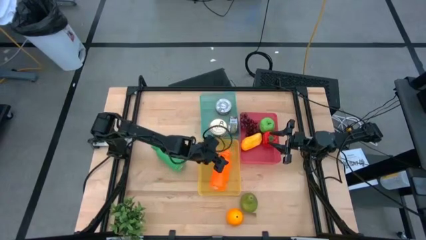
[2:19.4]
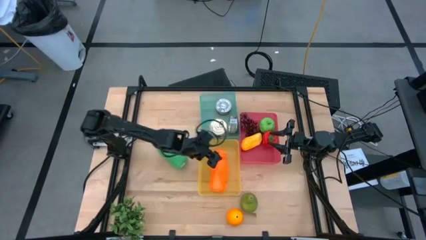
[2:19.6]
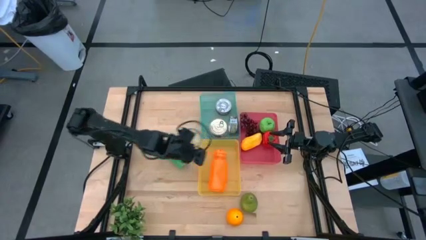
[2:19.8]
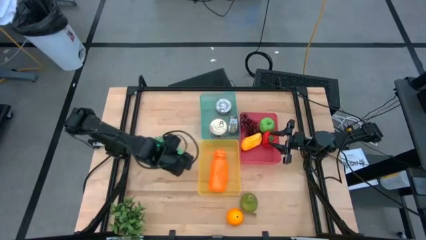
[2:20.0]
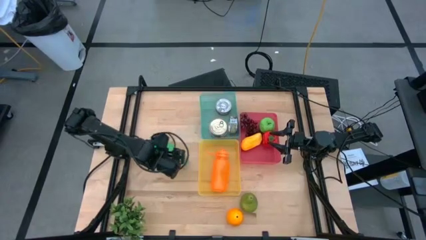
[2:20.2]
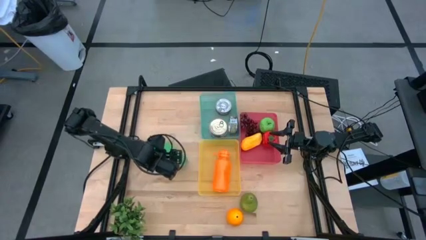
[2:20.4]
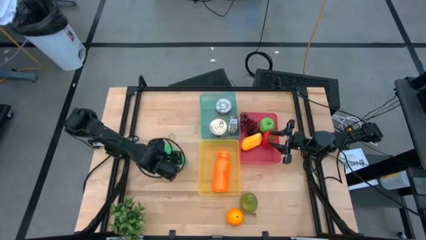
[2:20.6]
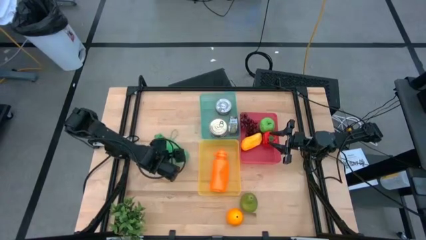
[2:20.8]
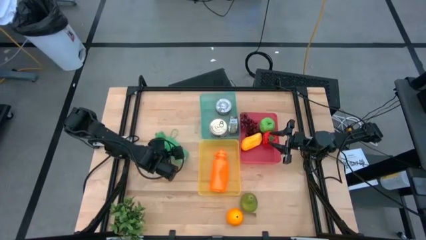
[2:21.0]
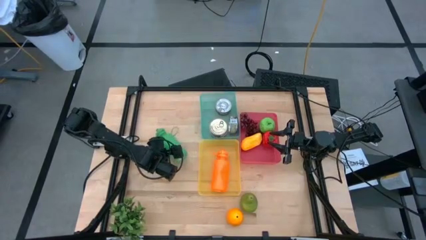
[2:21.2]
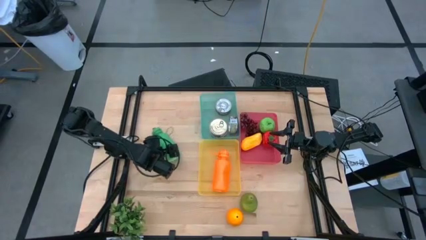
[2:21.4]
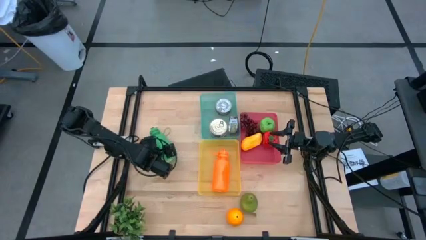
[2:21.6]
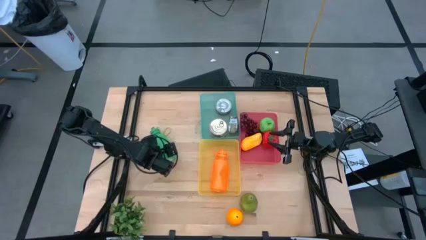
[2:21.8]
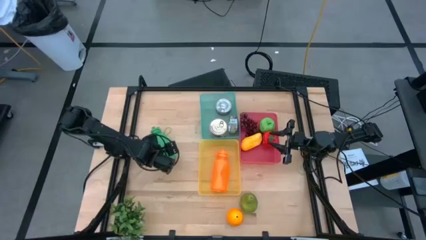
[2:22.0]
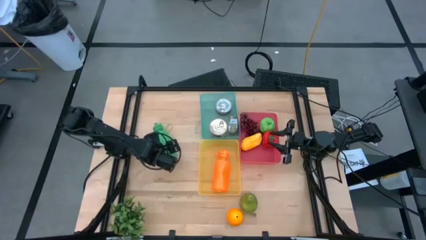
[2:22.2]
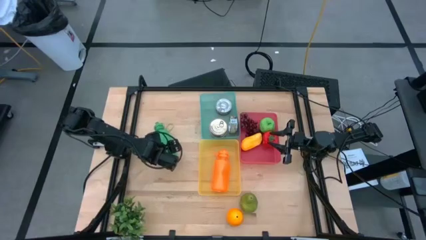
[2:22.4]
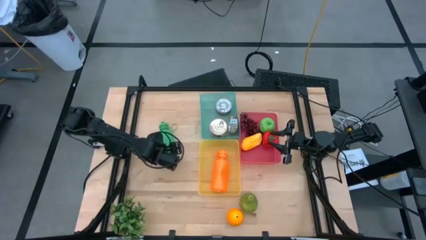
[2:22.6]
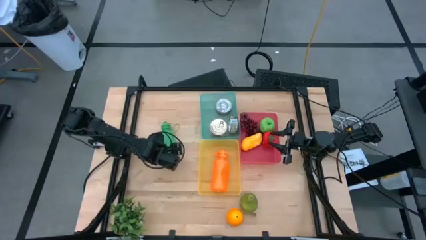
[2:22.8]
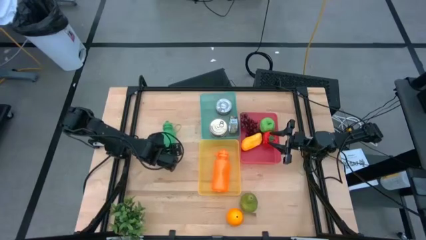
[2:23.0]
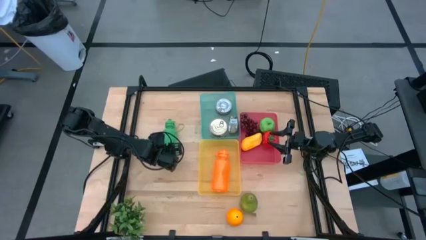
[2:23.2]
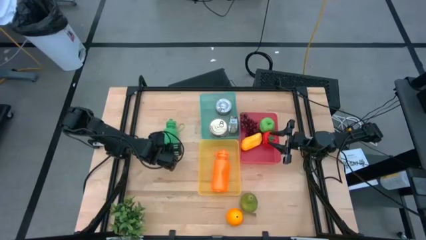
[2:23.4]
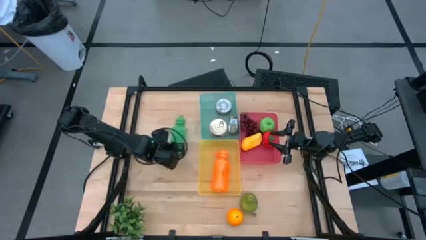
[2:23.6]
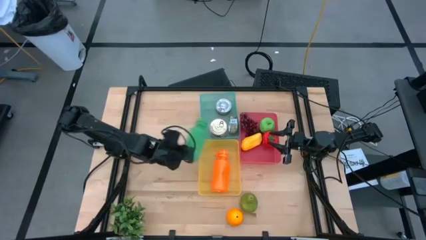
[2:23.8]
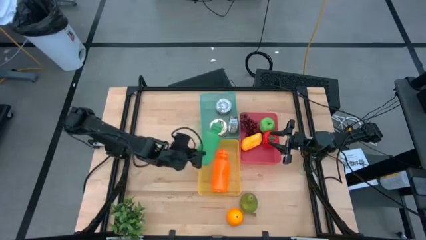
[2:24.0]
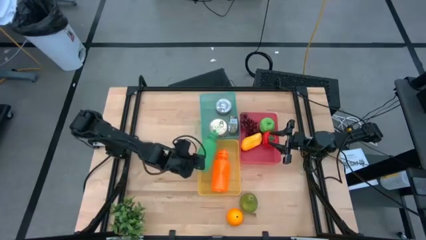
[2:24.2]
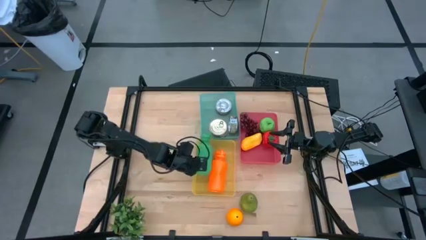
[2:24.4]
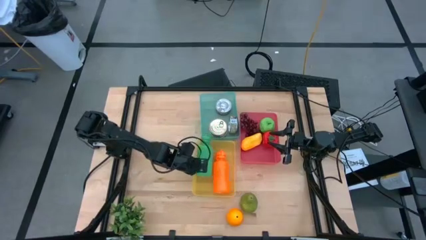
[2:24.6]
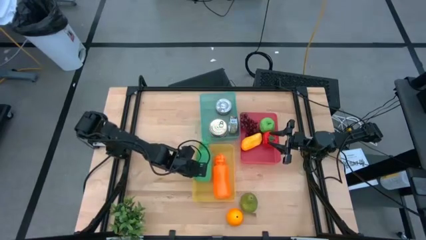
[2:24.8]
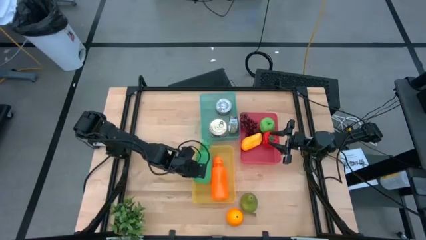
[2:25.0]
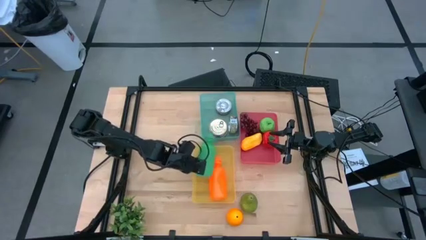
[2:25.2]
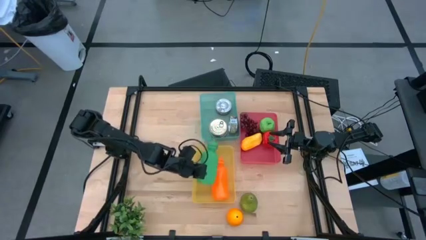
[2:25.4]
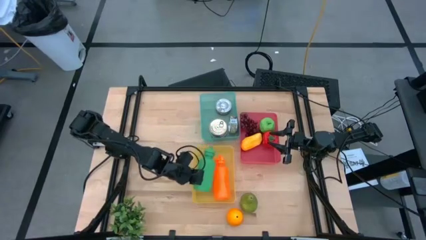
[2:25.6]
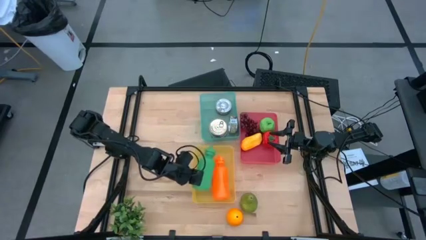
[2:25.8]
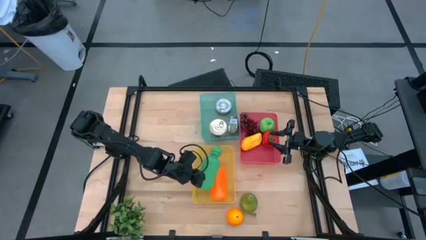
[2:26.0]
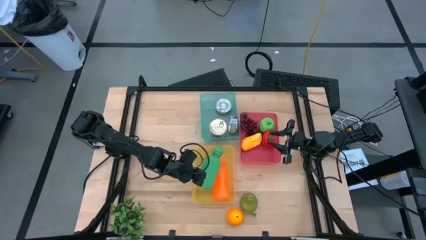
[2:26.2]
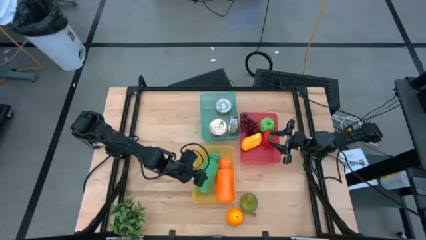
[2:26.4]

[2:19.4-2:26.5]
Task: Pick & Place Food Item
Put the green water bottle into the yellow bin

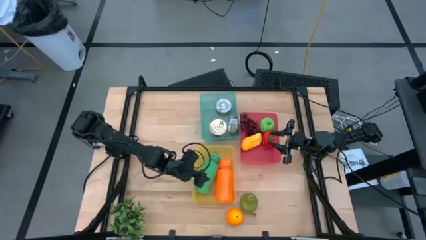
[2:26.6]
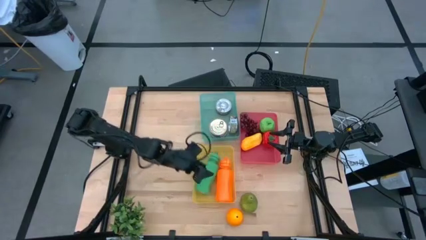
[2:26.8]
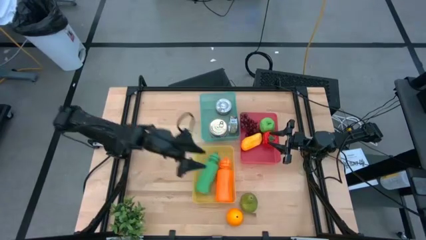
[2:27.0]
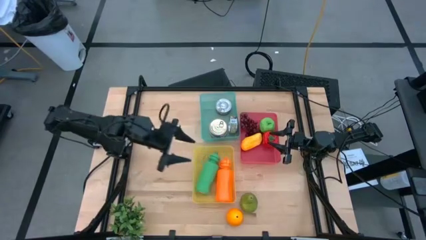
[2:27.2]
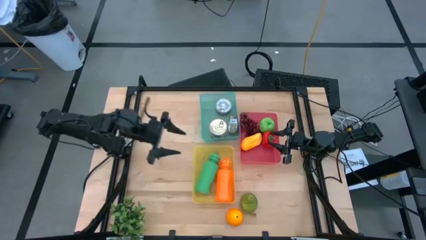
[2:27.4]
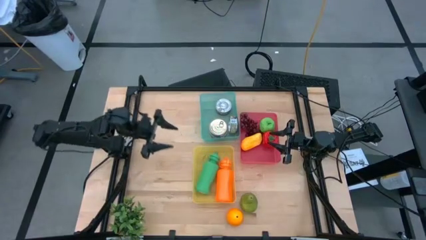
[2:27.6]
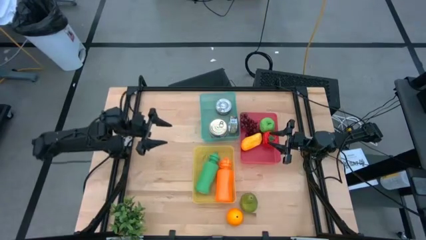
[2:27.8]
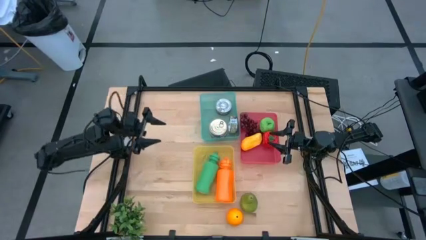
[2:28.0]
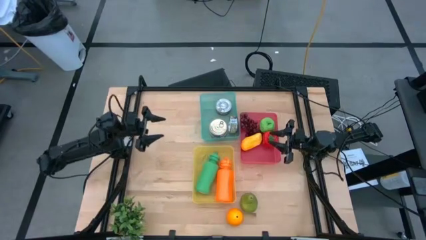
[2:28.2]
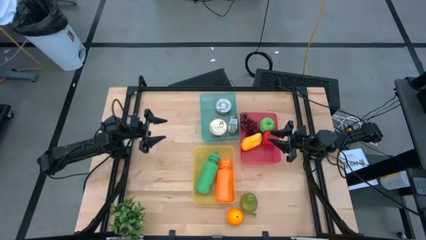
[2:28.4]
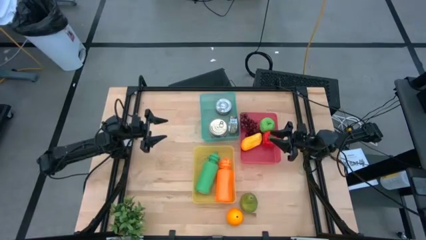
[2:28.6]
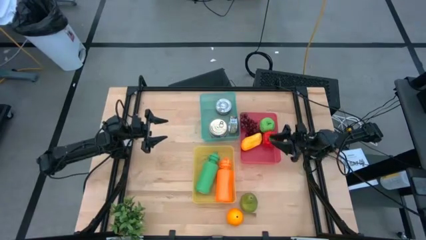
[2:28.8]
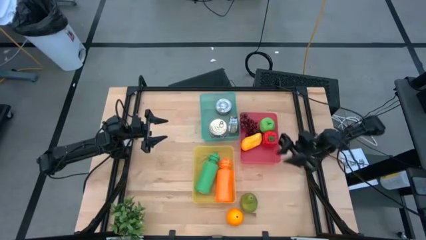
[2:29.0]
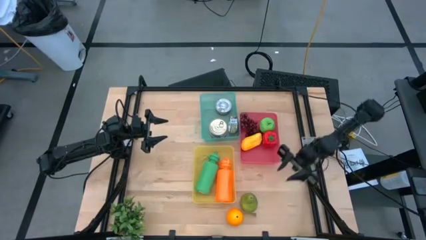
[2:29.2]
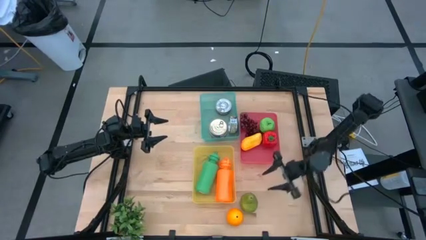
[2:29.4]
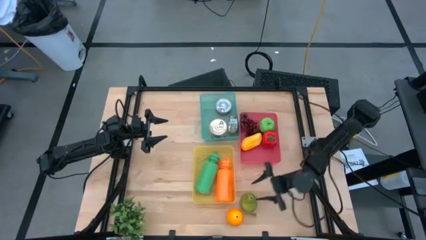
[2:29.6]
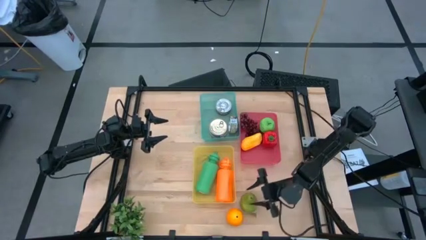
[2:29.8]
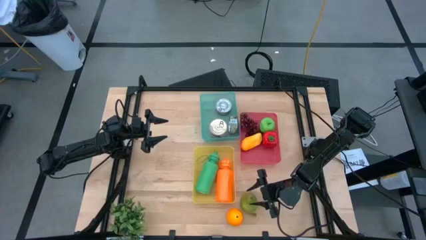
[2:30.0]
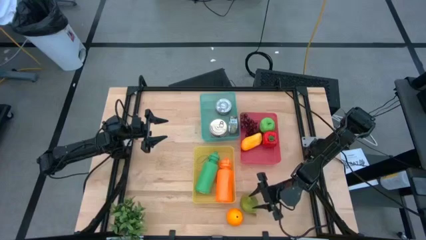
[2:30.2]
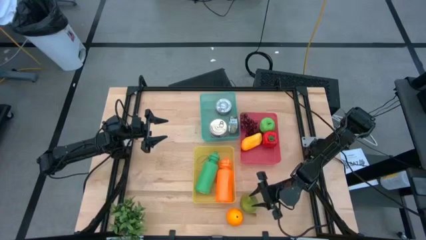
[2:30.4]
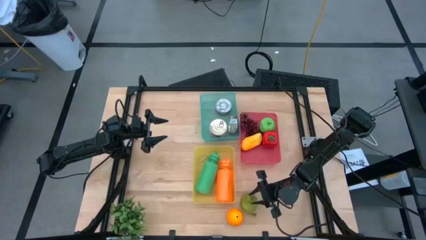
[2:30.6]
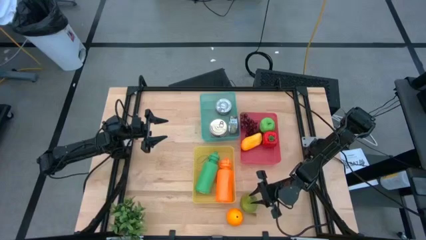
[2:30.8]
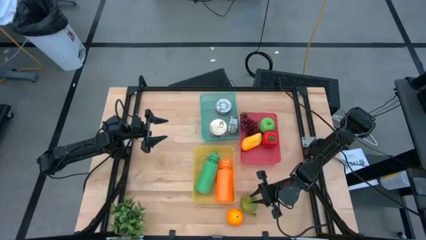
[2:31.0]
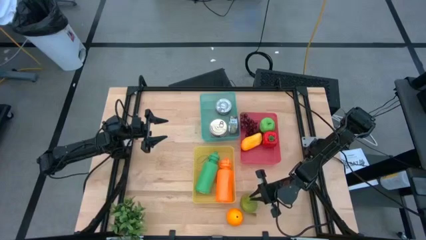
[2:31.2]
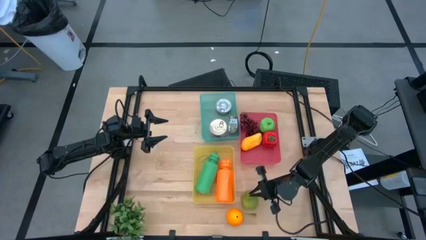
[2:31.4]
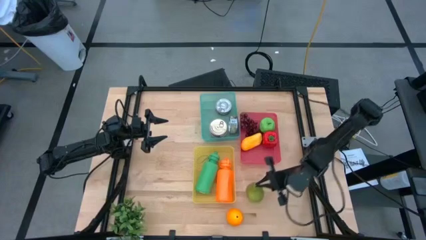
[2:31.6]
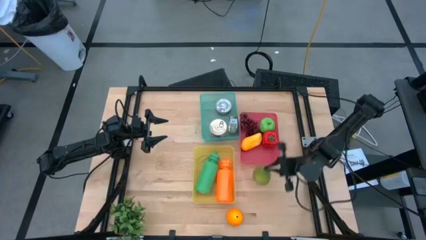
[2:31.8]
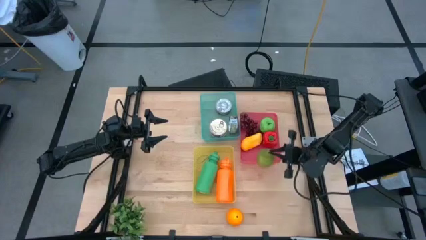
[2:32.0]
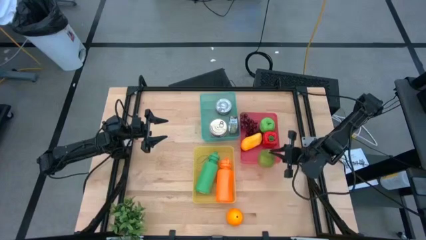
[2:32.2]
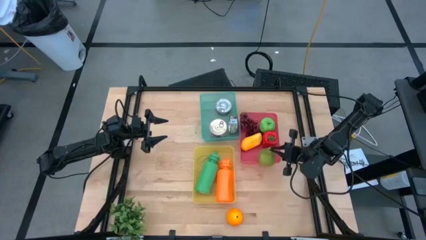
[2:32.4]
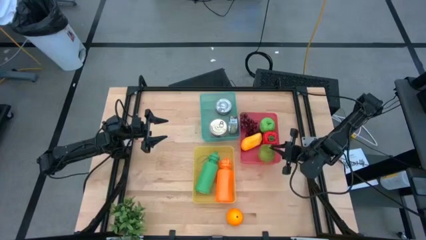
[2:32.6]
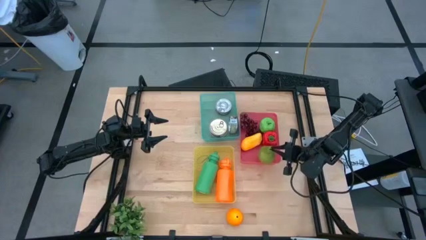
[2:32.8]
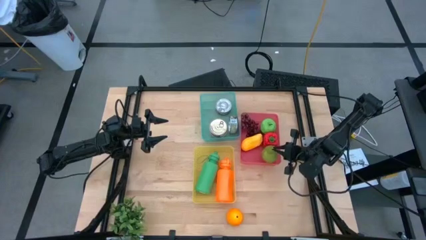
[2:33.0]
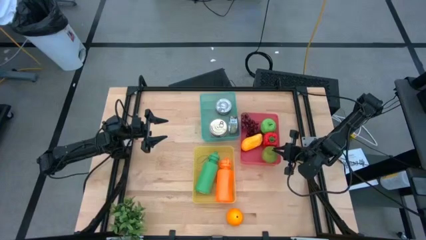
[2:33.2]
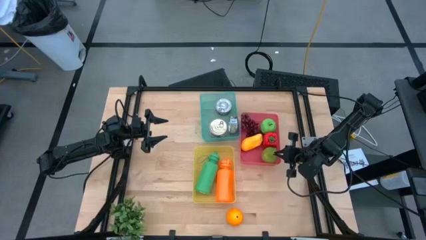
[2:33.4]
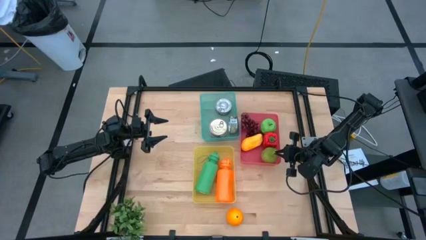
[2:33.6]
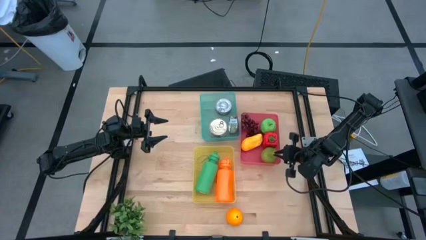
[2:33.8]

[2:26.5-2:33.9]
Put the green pear into the red bin
